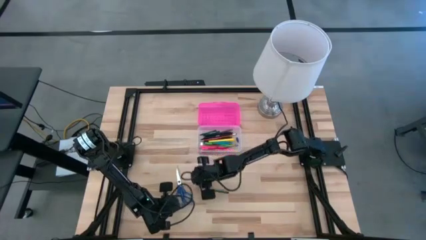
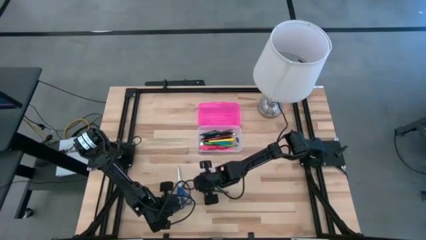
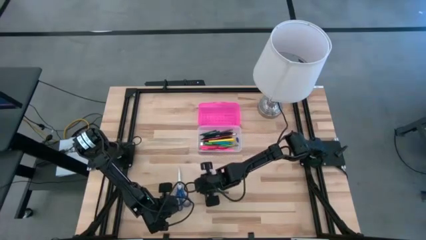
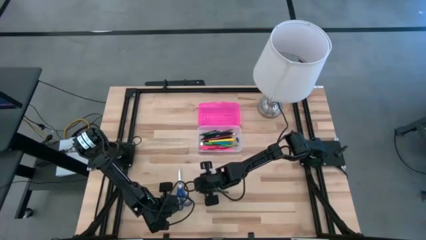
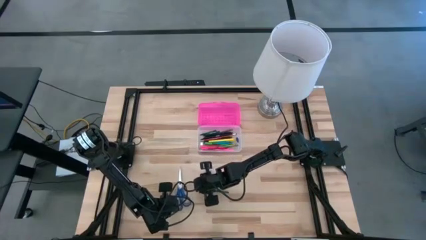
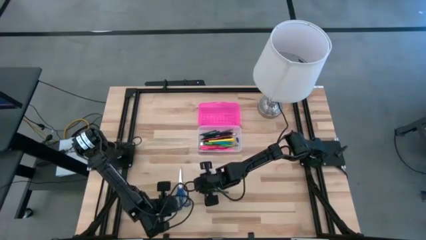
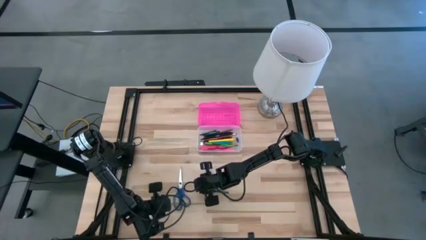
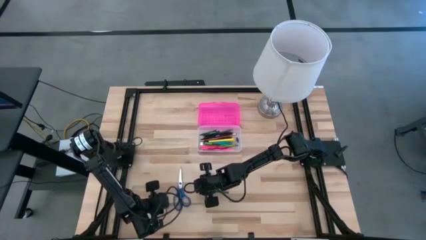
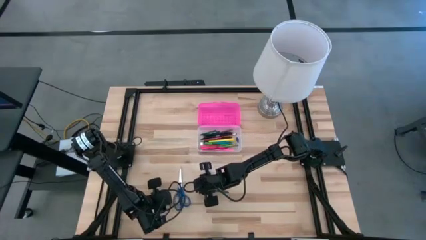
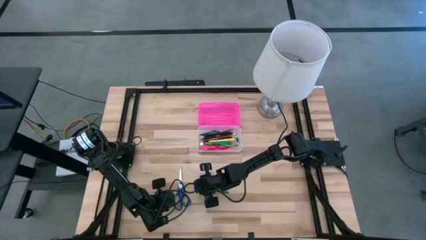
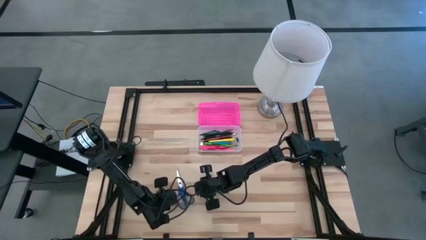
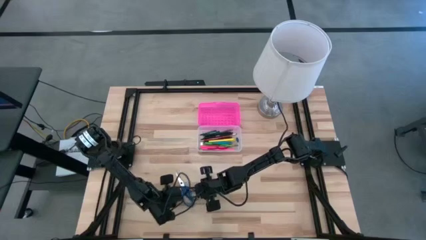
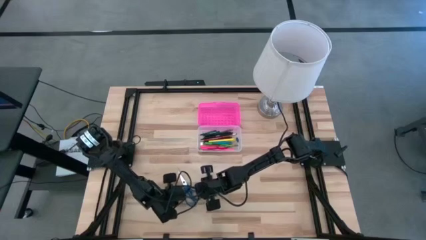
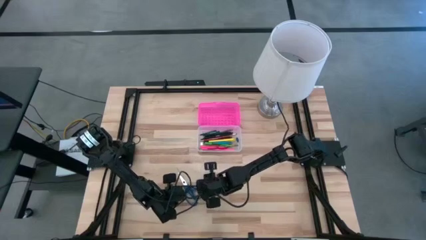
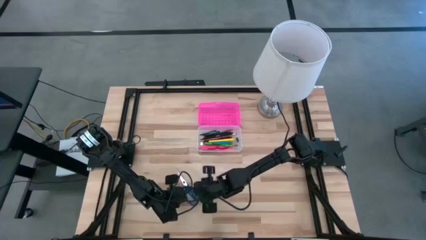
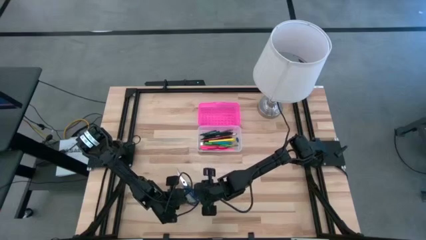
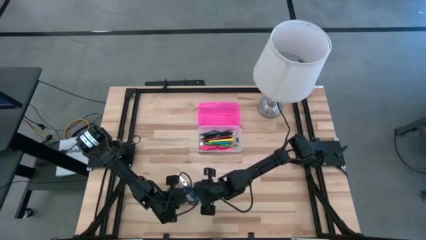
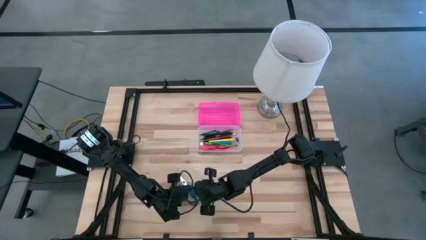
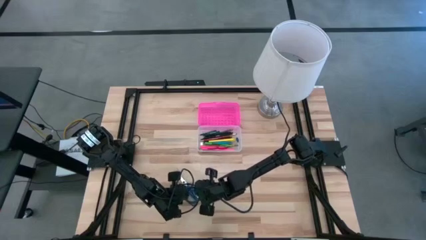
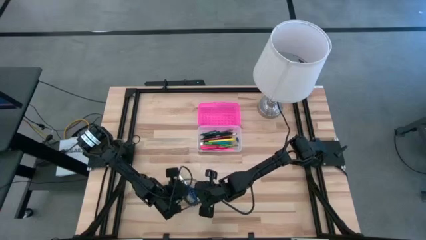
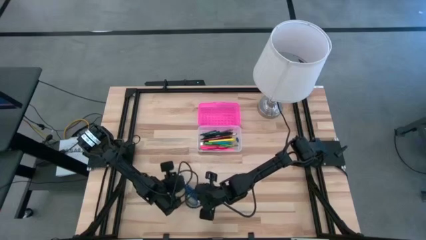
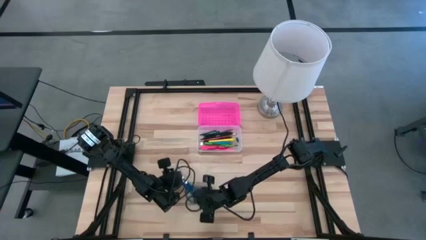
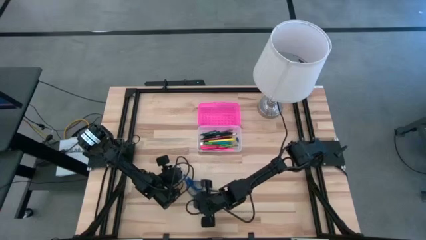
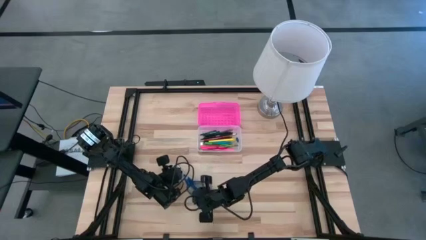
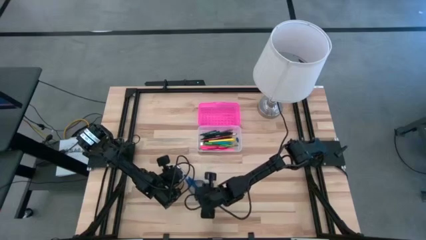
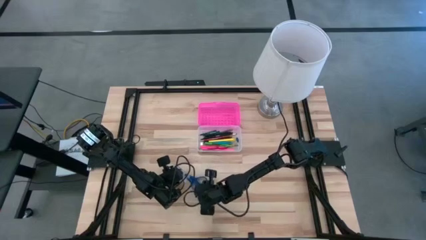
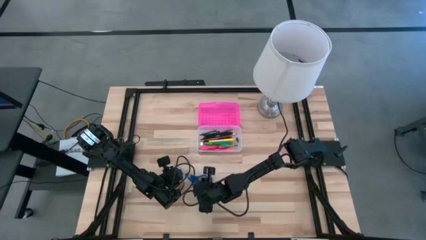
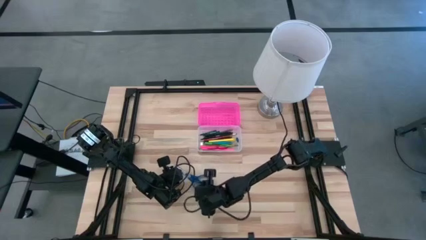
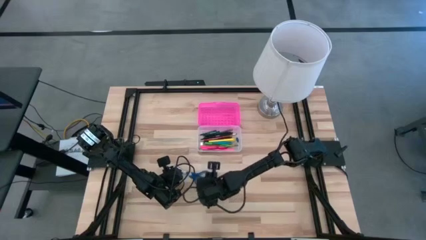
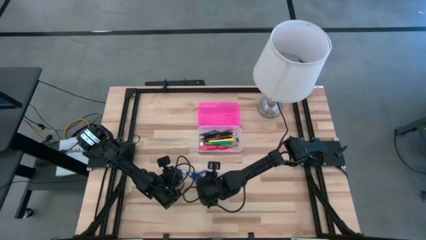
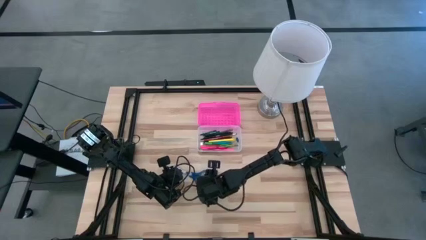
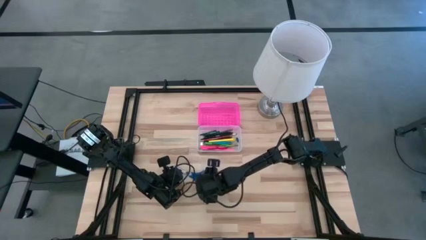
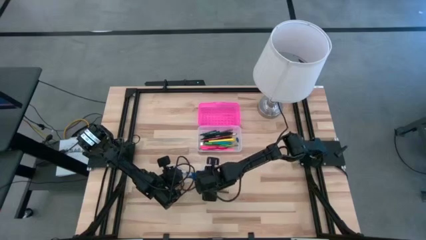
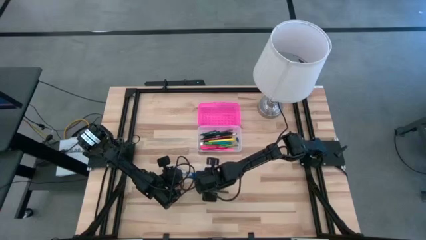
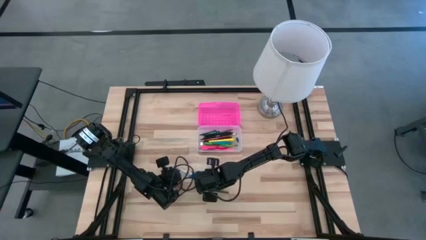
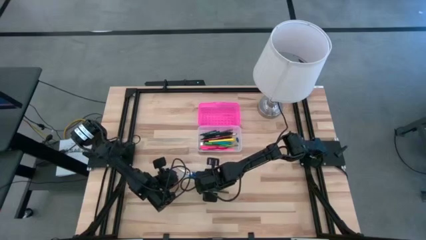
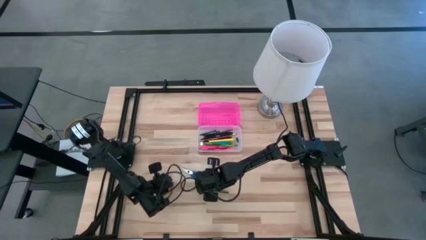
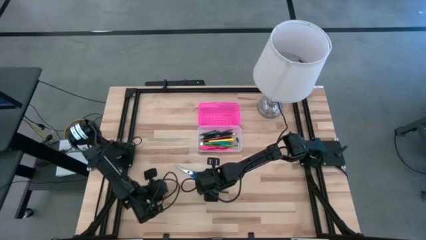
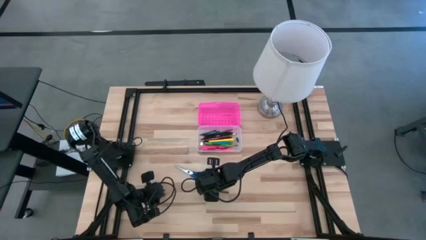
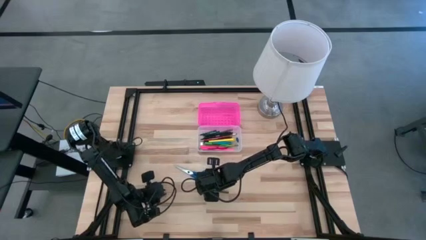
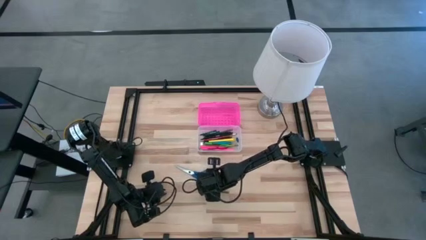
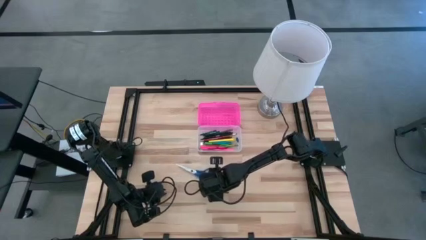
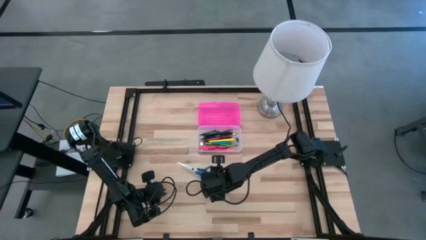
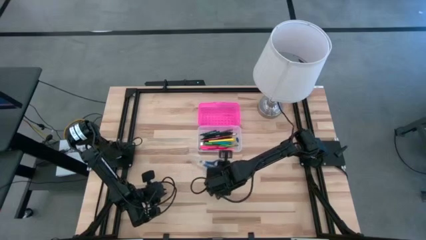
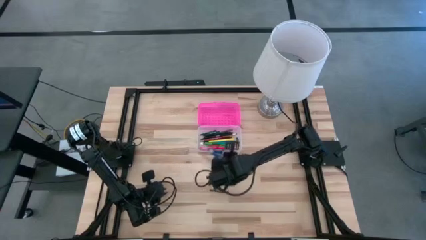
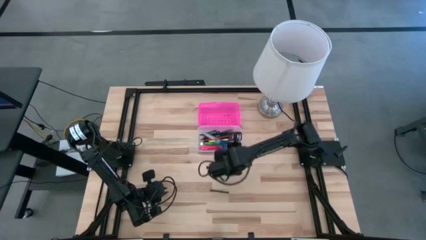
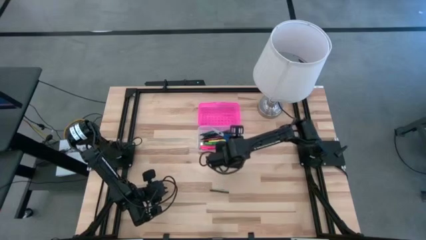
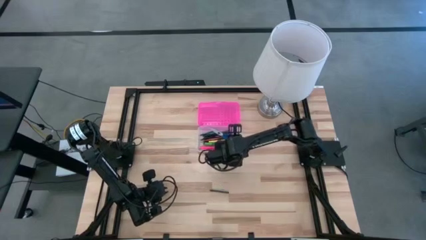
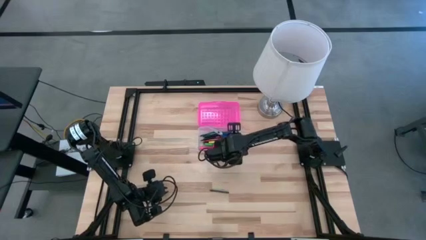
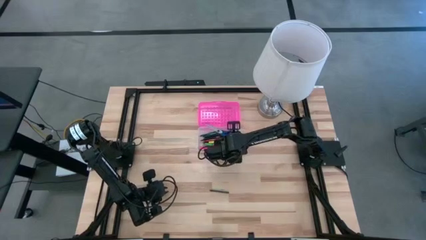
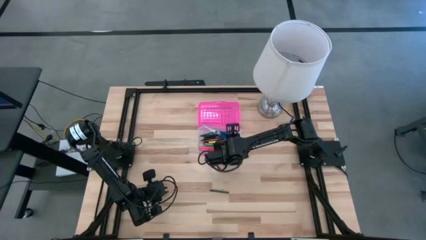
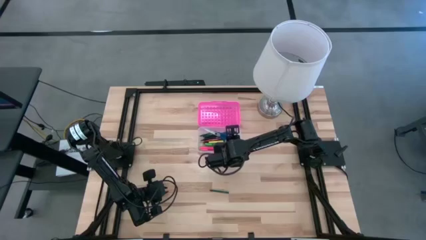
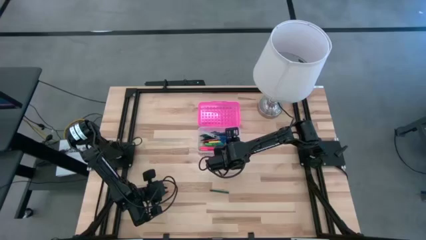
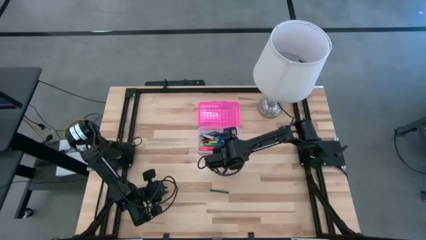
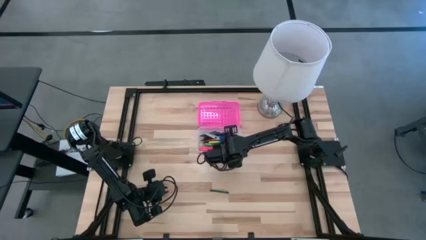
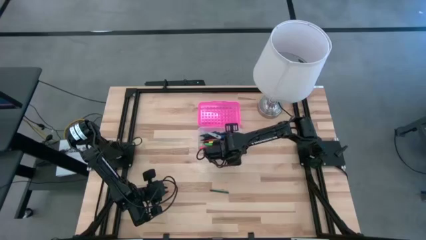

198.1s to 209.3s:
Task: Pick & place school supplies into a supply box
Put the scissors into the supply box

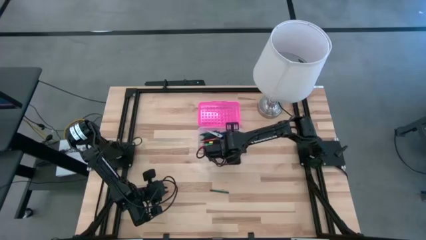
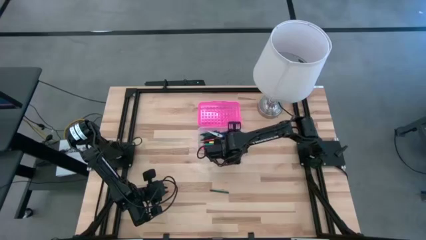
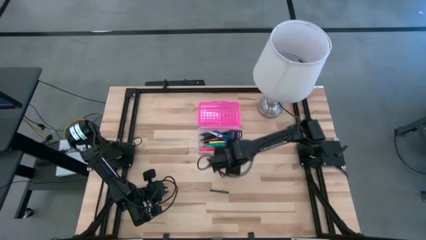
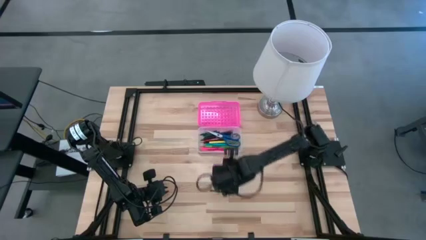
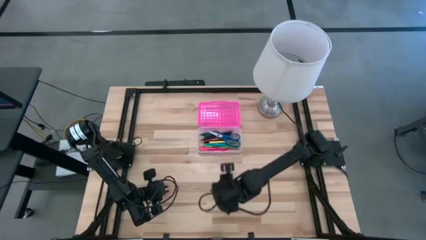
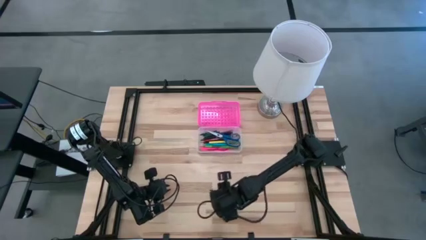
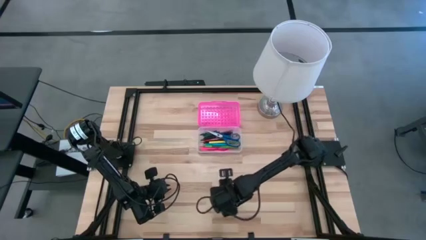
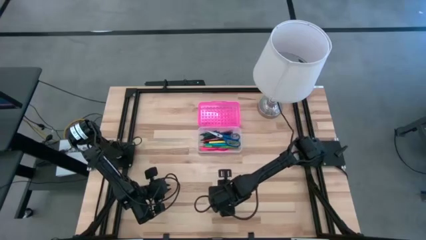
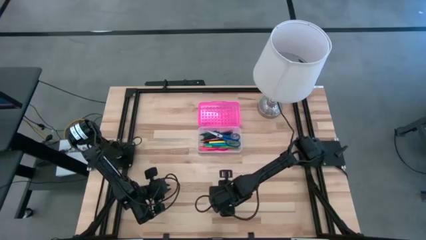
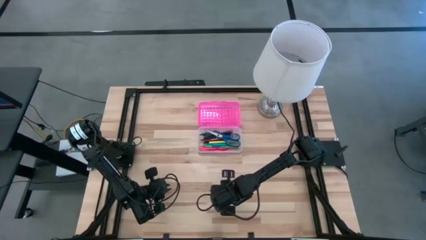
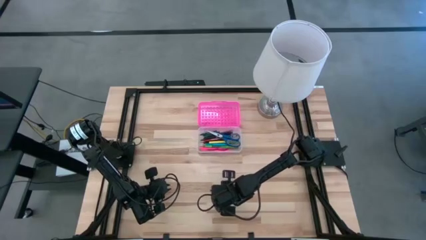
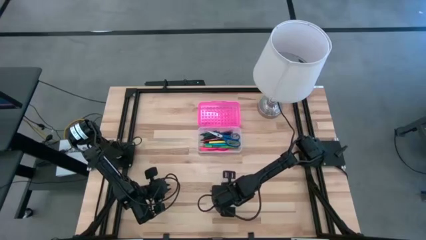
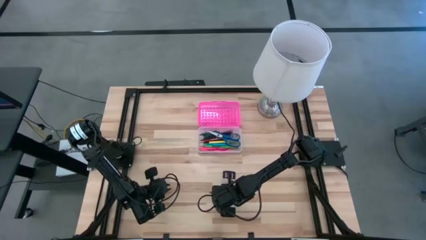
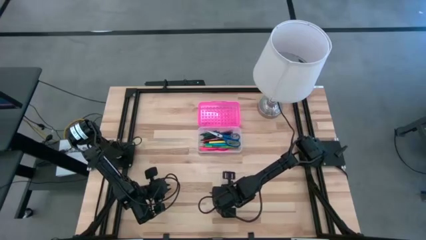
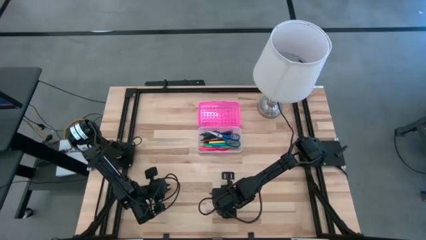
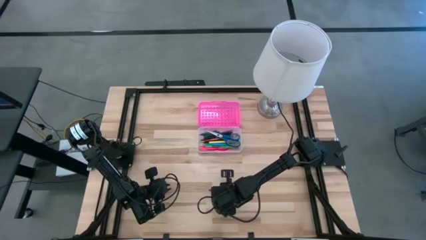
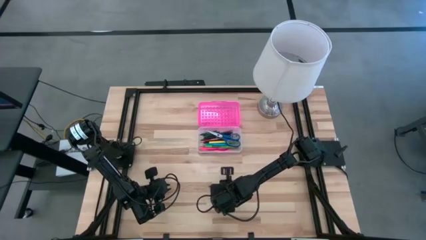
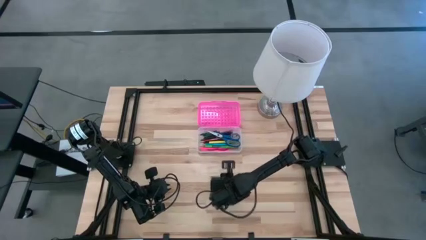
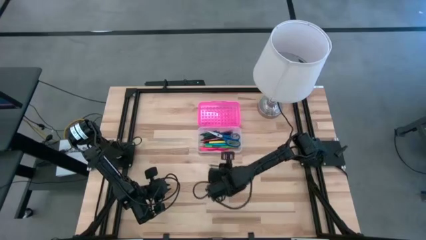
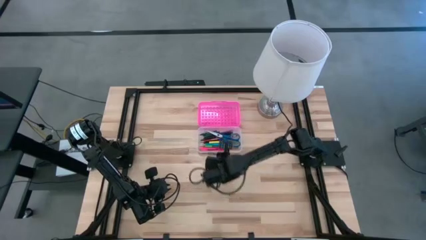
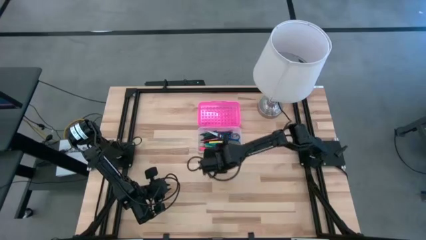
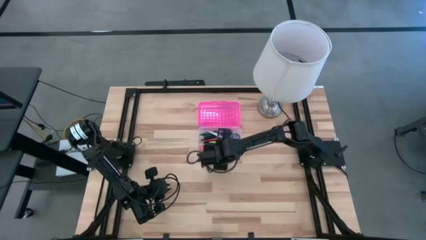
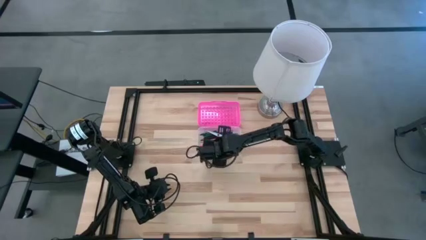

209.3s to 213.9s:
Put the green crayon into the supply box
